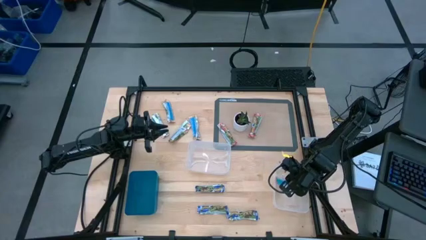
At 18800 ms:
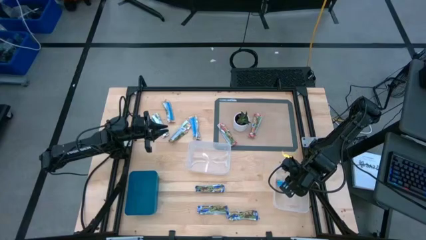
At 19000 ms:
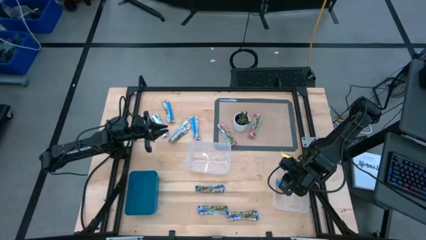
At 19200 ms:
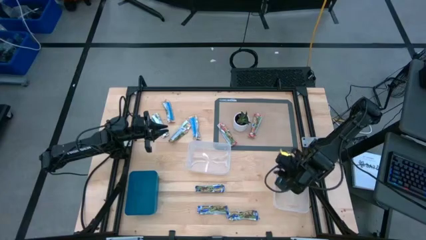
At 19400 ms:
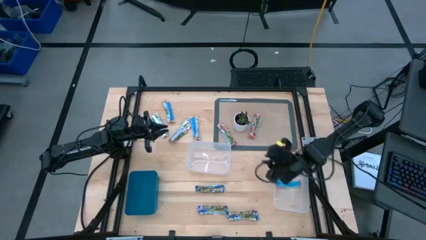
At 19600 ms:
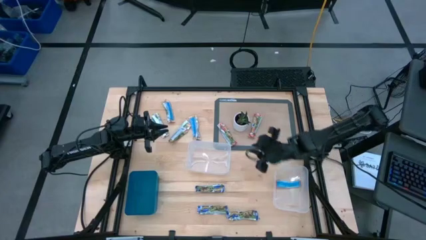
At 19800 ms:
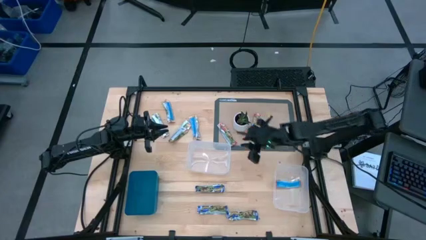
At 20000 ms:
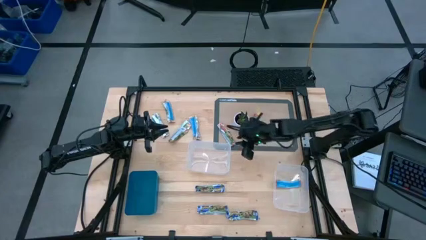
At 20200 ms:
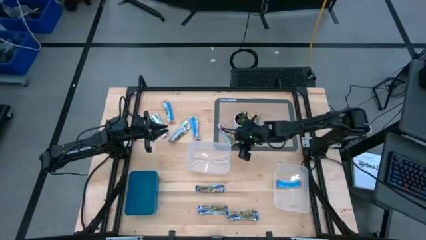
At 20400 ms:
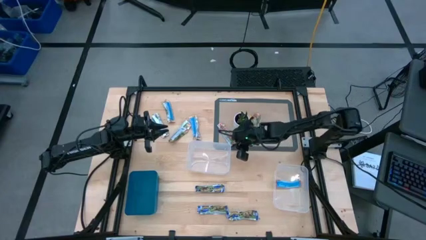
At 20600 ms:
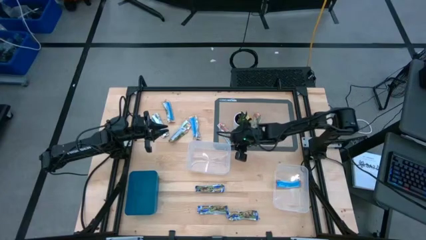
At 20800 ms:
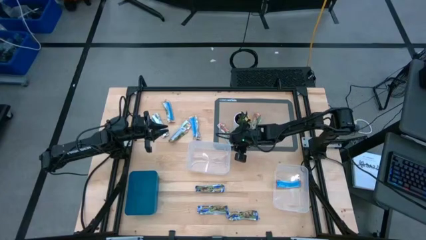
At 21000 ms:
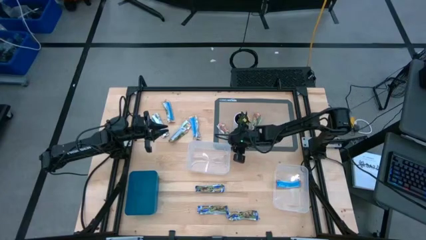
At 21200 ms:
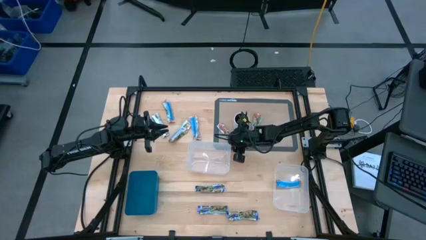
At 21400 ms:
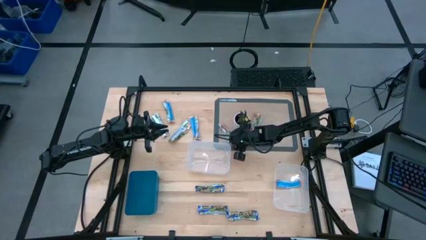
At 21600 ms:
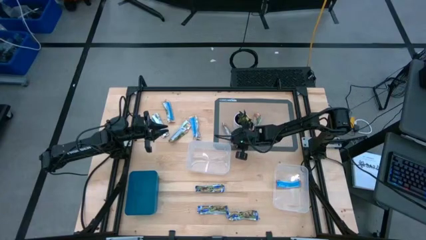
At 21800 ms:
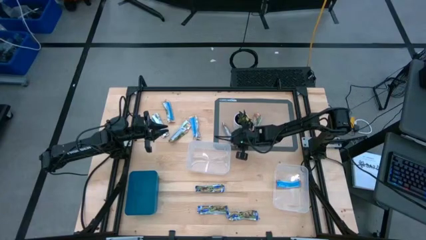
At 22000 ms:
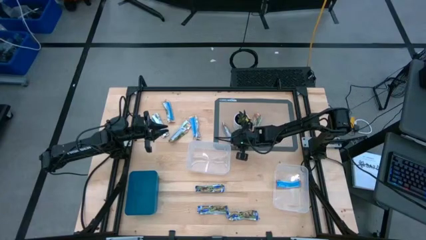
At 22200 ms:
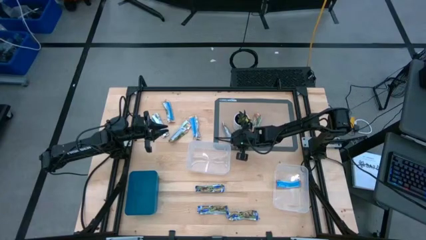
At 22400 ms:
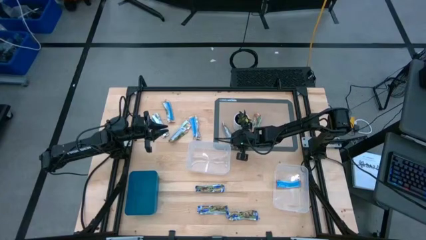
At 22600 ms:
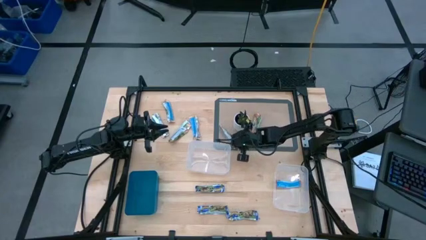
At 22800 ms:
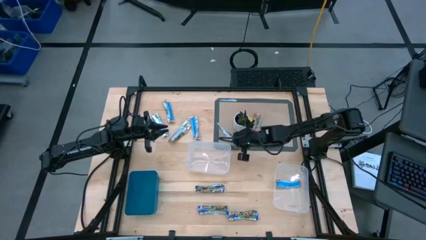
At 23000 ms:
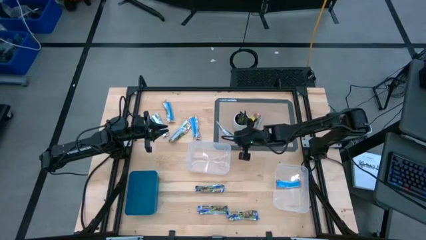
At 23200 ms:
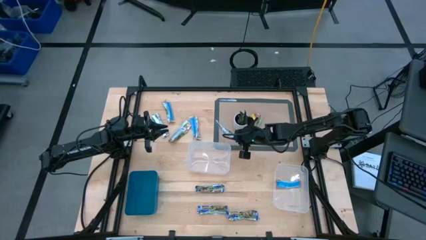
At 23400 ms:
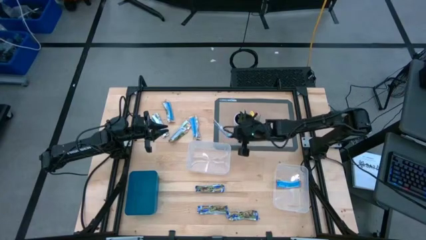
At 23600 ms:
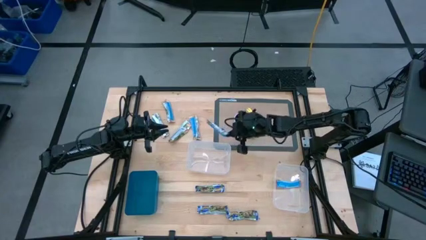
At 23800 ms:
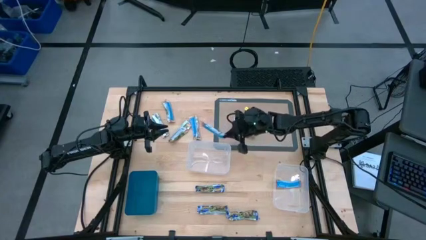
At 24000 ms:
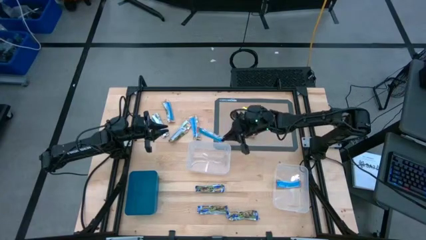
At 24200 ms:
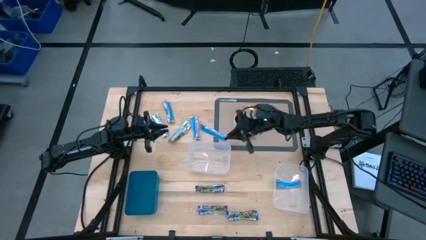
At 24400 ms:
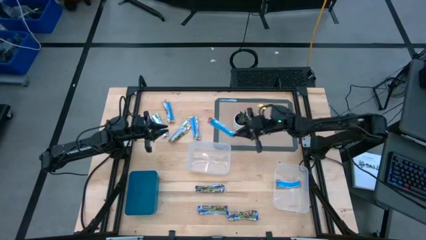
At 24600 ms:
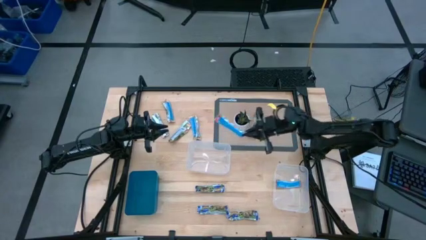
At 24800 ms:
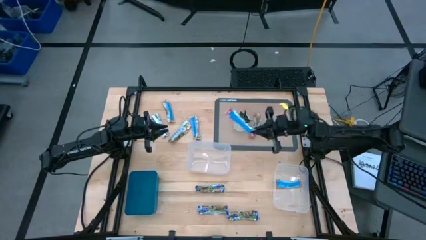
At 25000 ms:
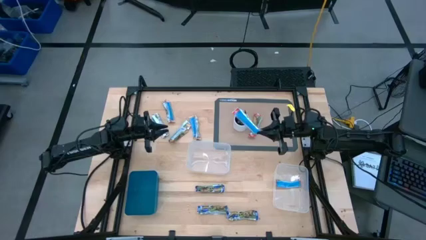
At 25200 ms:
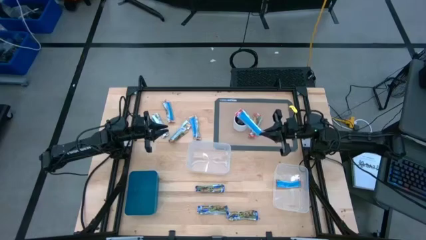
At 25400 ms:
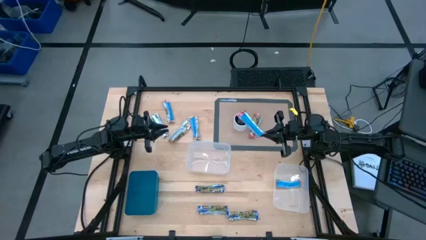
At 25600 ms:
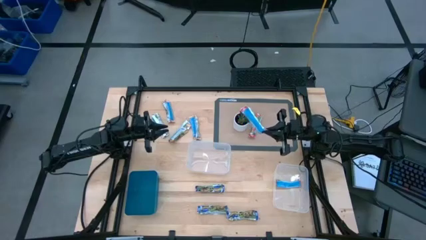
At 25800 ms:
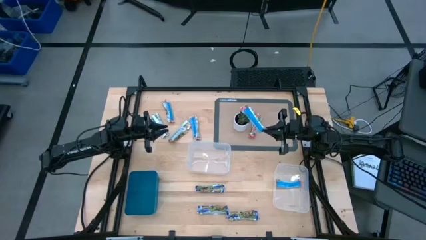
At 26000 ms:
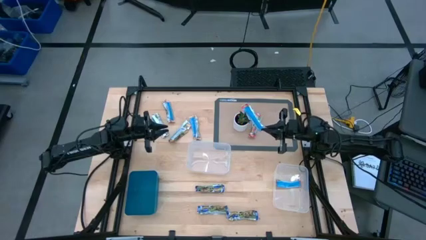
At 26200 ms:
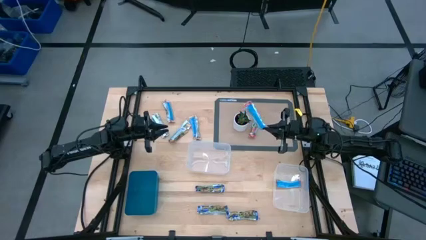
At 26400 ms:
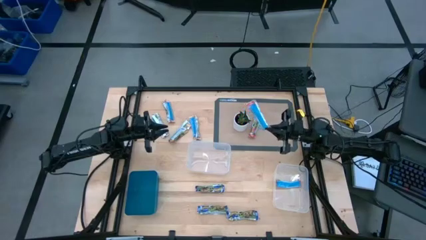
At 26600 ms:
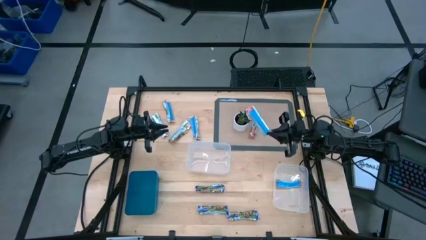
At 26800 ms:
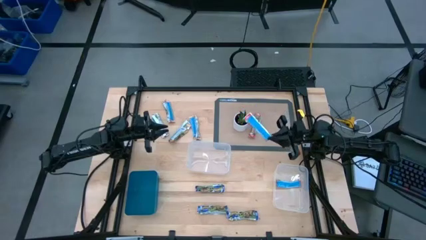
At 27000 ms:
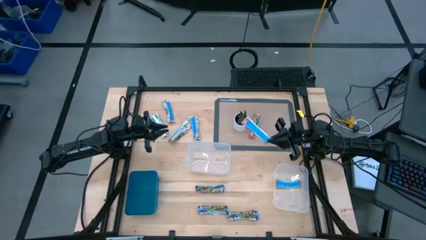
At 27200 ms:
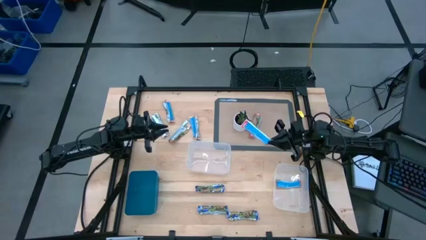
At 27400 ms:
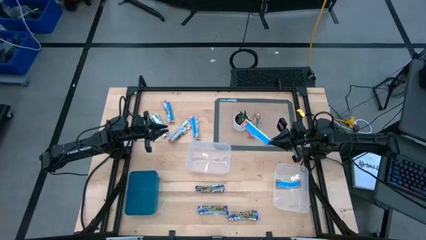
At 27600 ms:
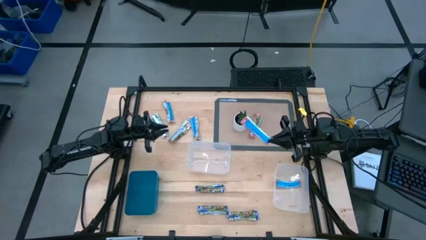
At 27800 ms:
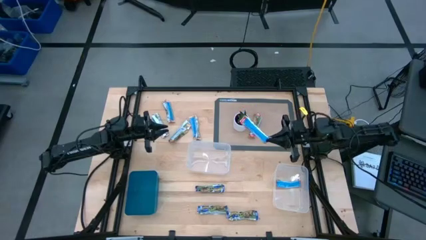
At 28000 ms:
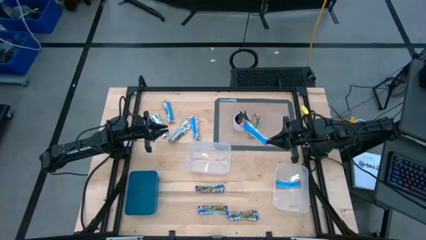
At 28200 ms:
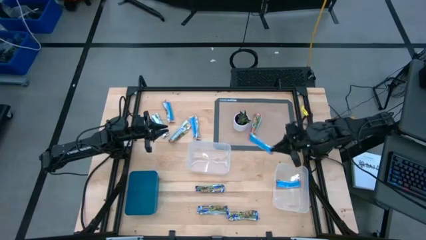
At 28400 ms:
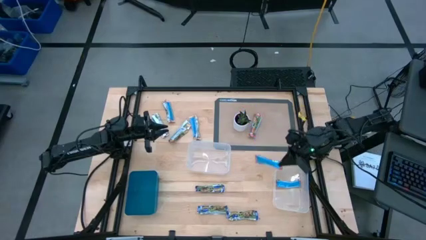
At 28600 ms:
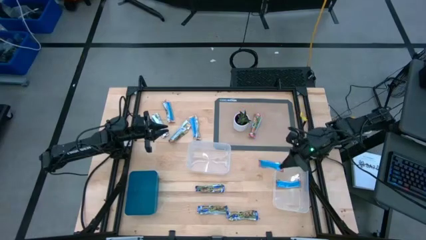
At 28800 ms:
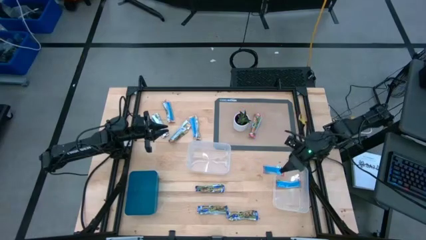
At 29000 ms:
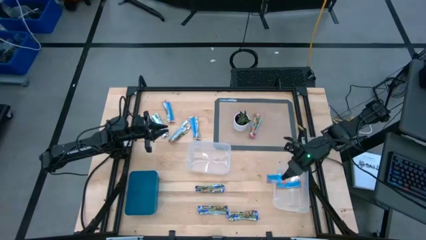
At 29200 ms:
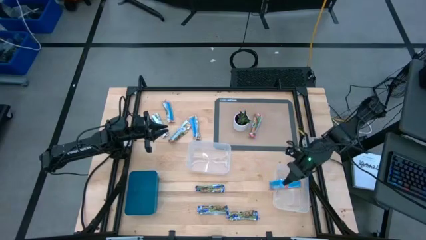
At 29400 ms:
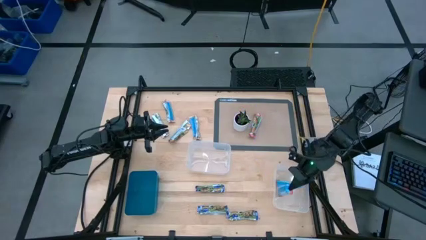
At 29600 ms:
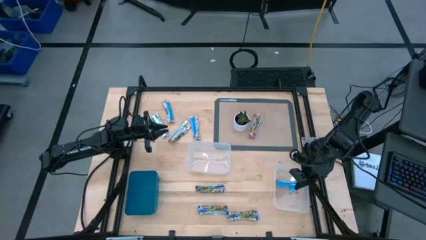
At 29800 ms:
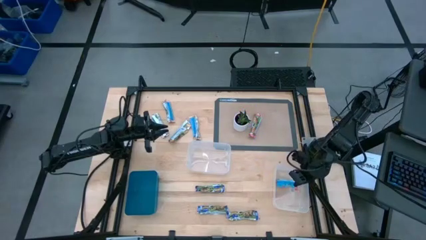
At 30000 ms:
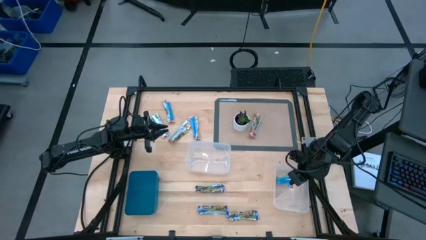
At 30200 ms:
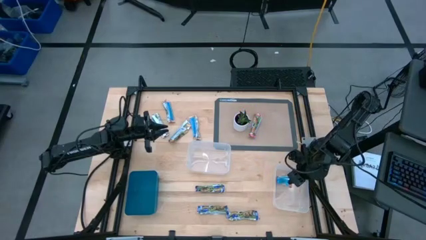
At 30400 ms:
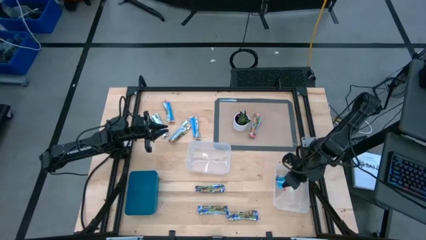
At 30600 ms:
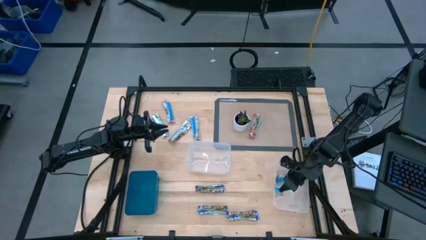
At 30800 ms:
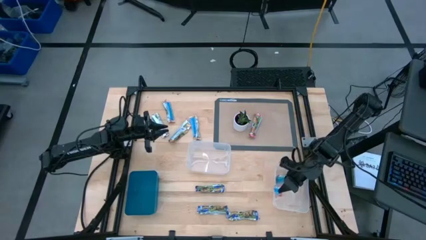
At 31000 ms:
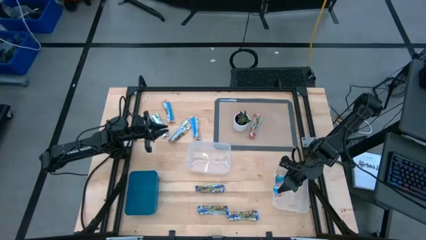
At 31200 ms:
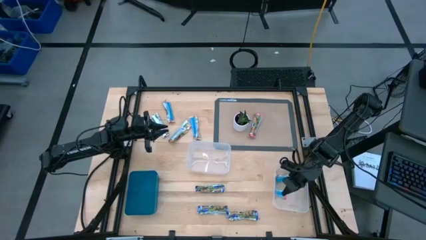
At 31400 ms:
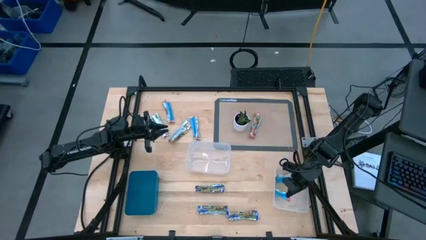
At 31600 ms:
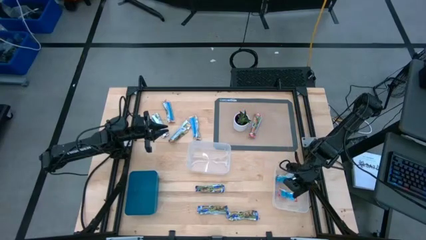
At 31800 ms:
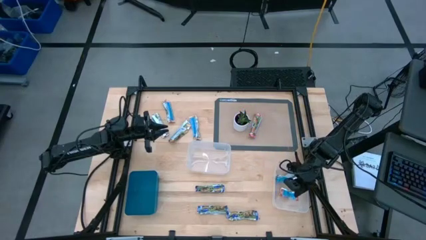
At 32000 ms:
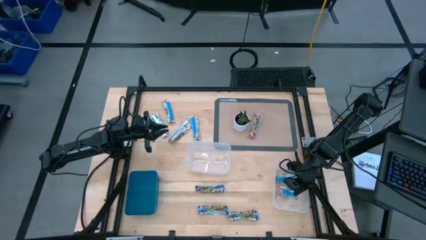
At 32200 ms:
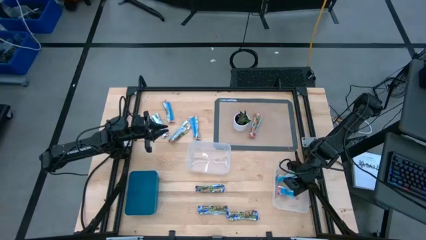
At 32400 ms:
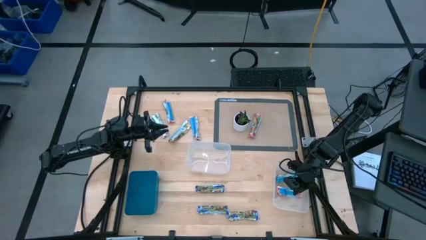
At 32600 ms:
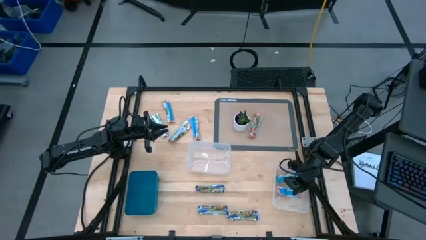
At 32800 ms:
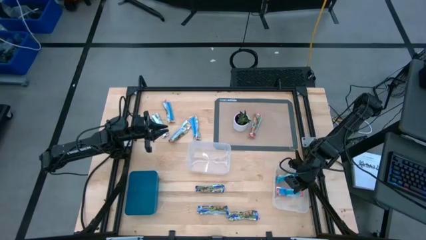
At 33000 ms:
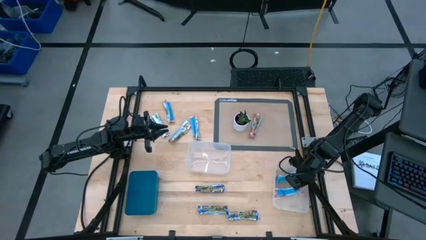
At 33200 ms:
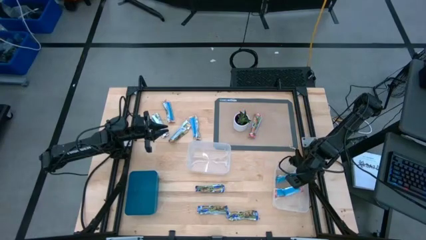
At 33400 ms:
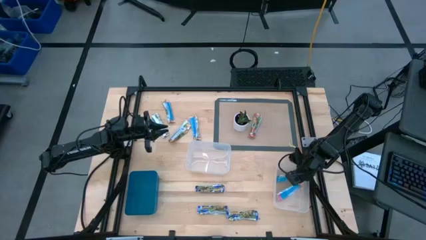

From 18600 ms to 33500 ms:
Task: Pick and place Granola Bars by type
Put the red granola bar into the right transparent bin
